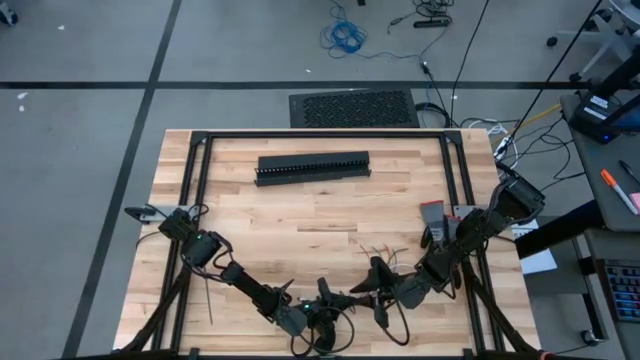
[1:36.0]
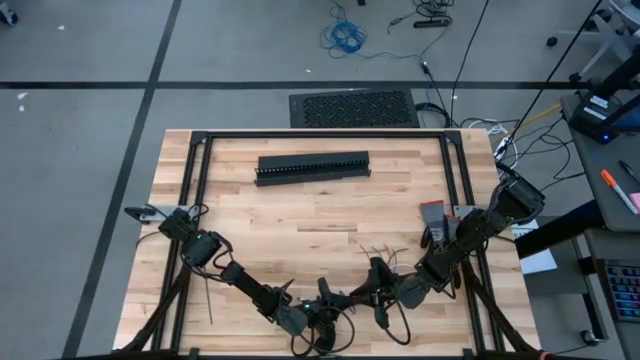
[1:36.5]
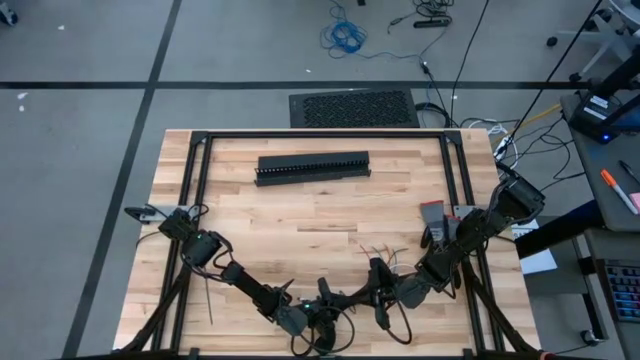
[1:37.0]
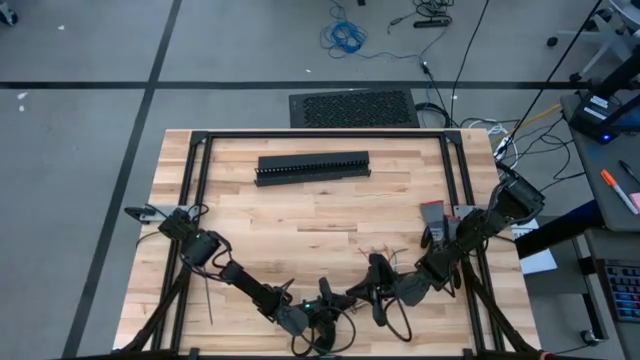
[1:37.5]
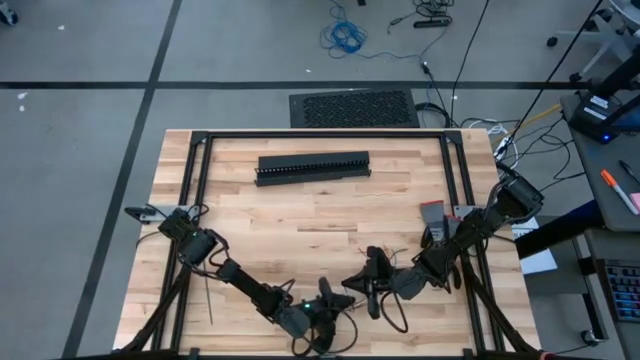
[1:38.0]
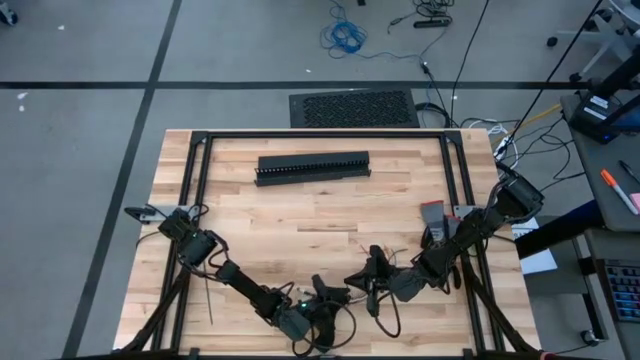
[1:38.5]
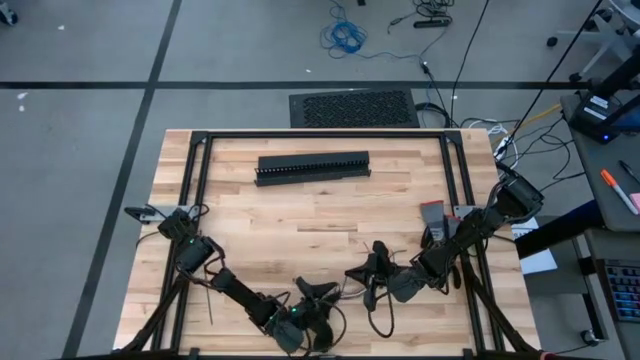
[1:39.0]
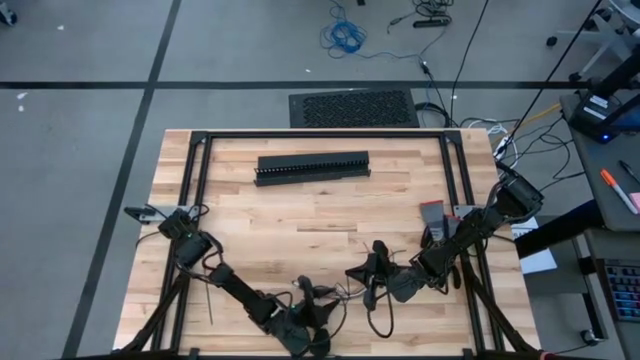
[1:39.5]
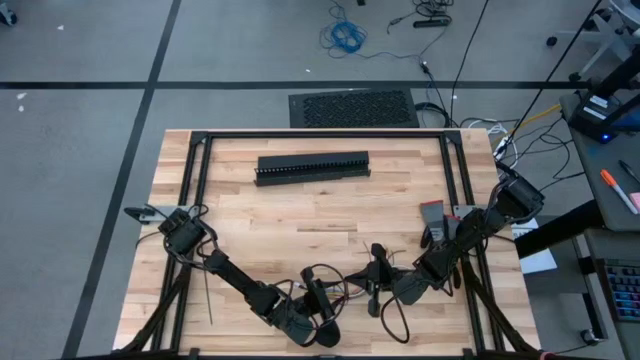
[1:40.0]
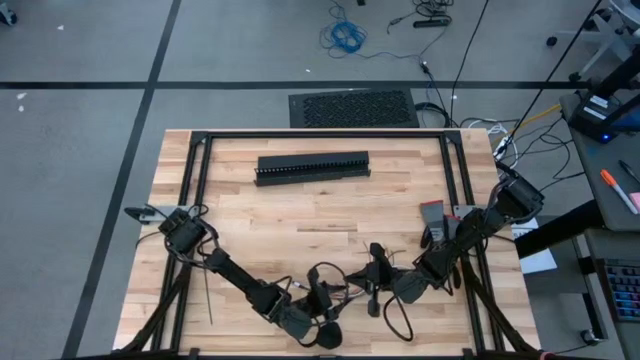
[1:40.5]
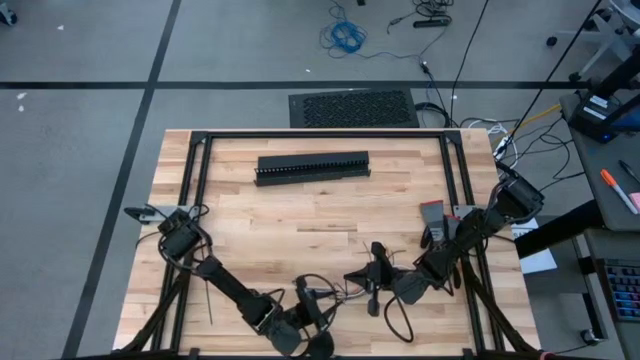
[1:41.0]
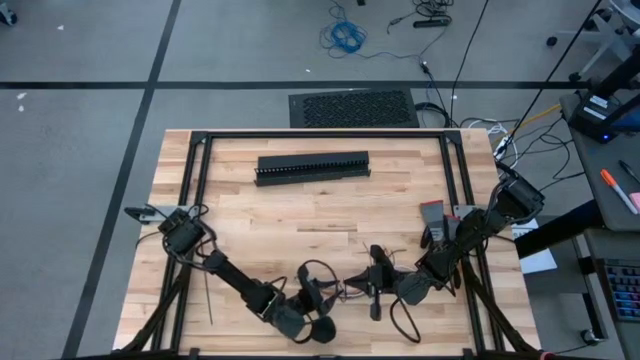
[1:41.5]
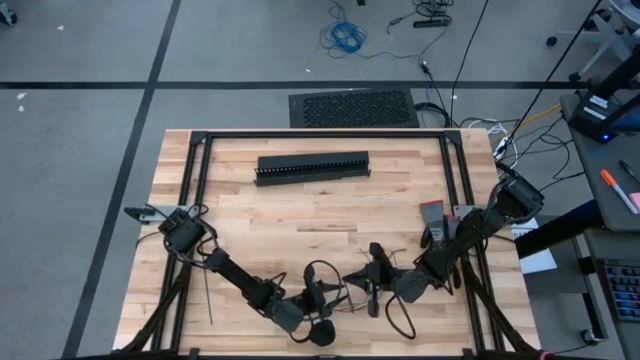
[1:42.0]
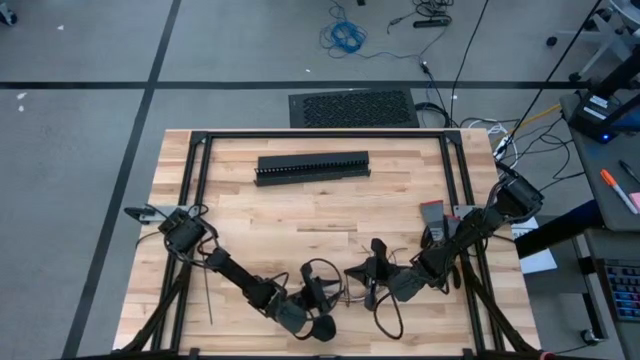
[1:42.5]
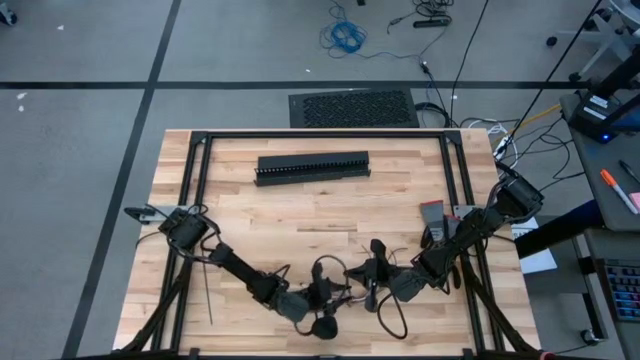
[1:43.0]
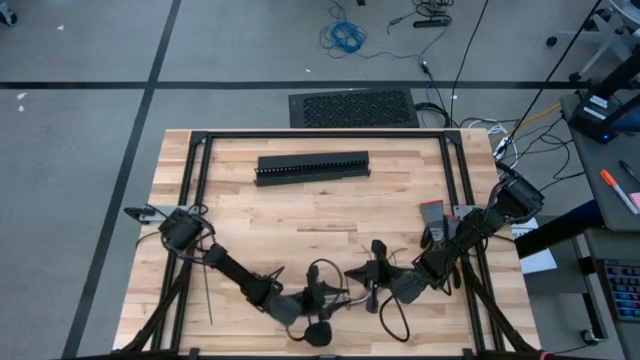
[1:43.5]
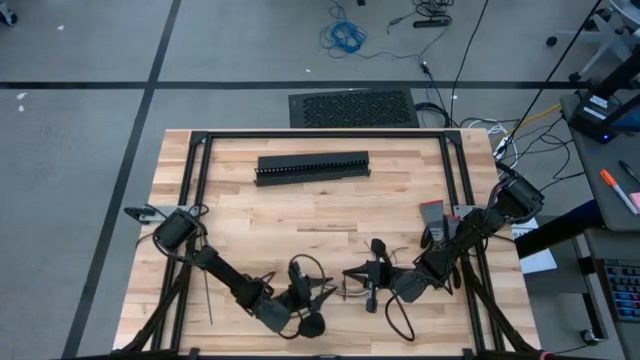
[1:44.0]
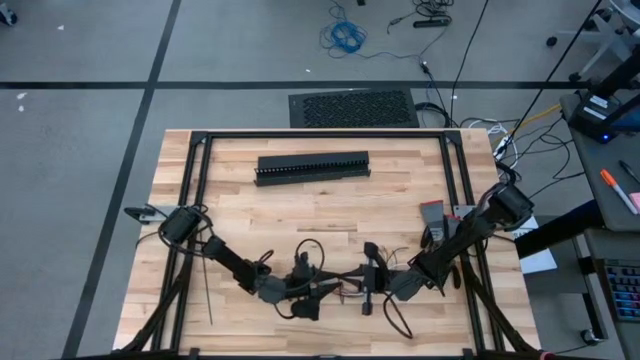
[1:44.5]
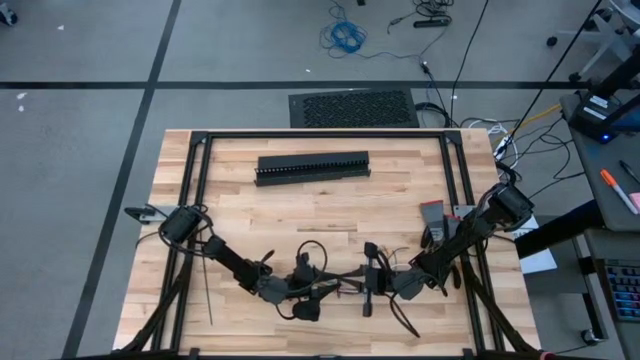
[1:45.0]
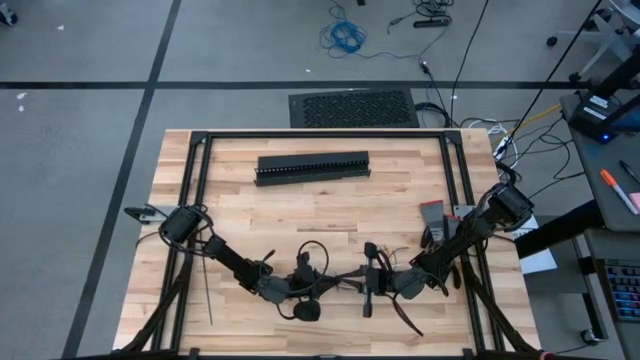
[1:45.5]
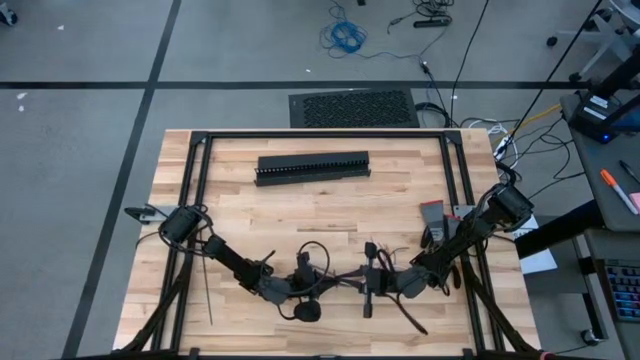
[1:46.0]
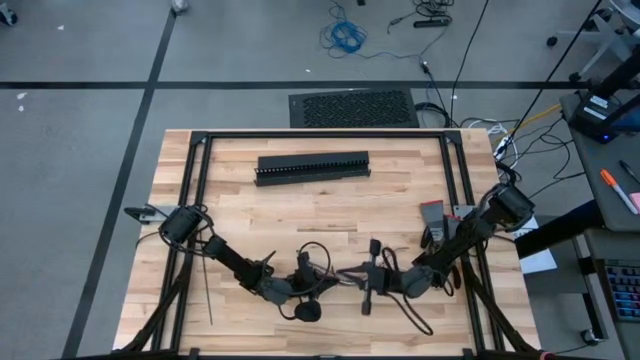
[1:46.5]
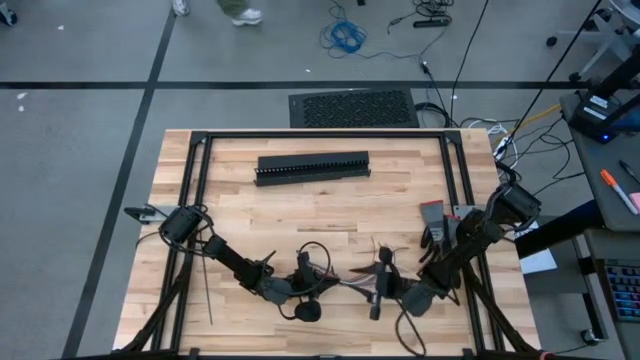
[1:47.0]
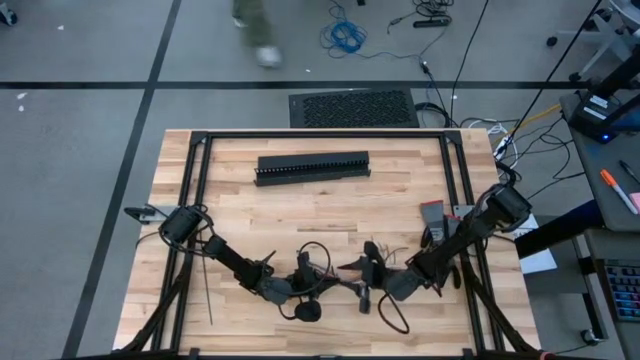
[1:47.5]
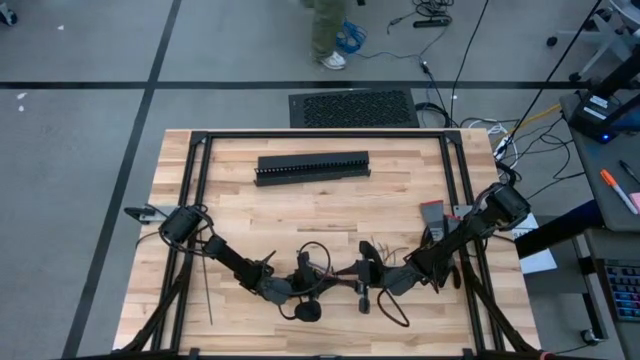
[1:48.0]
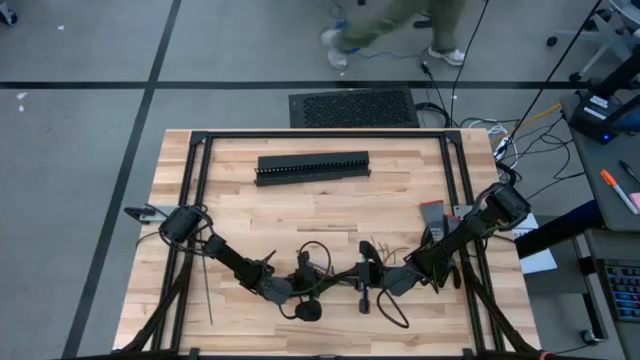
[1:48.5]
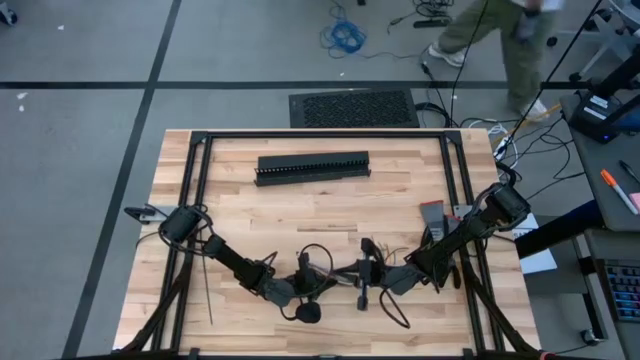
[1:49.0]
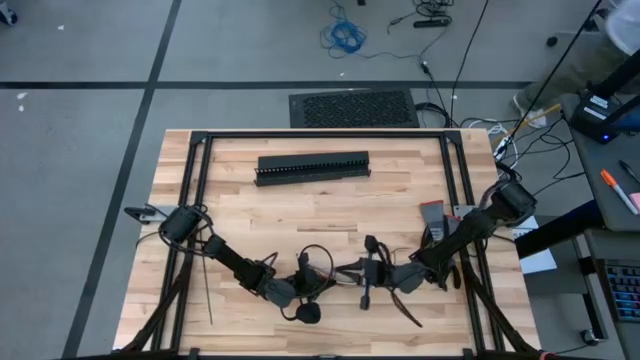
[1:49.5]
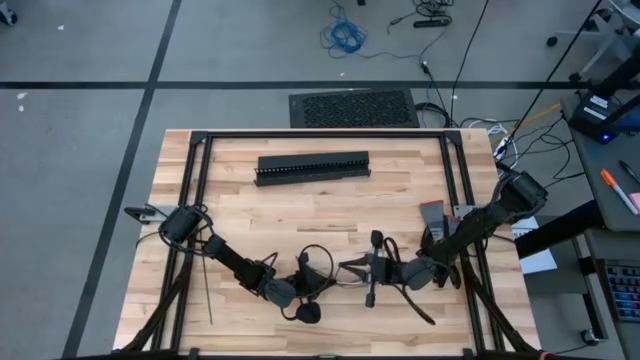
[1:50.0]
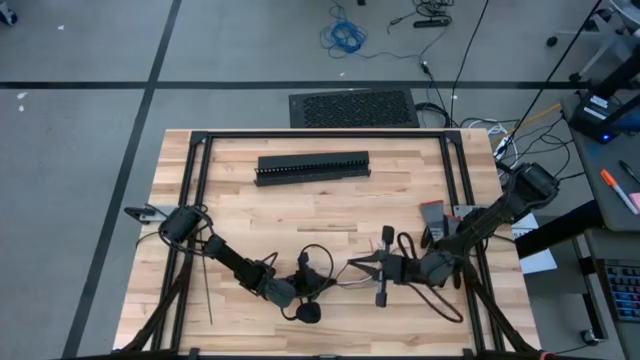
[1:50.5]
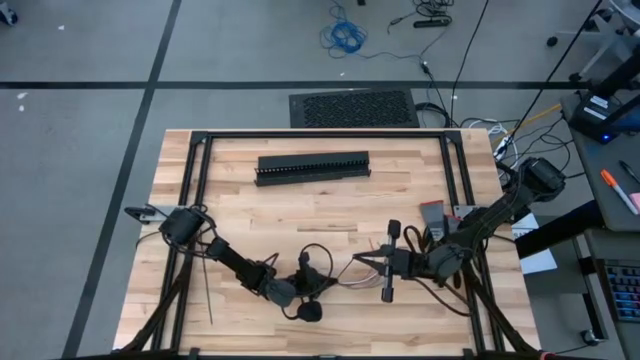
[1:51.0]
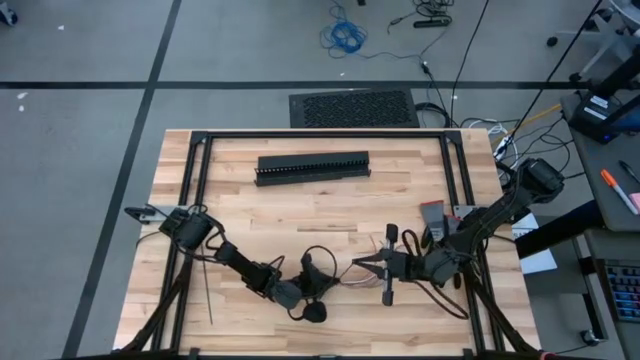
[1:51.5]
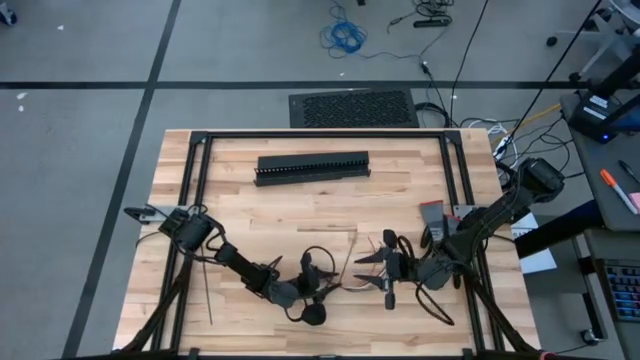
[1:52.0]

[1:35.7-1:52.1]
Task: Ziptie cables
Wrap the cable wires with the black zip tie
